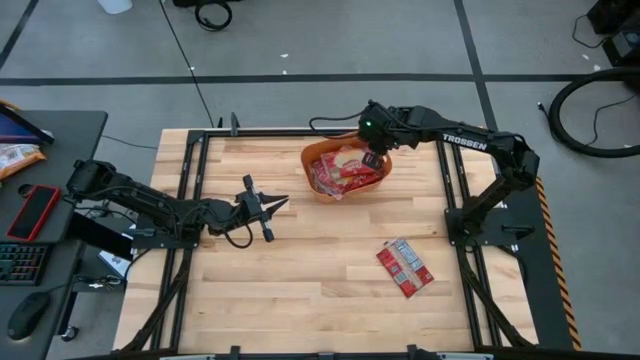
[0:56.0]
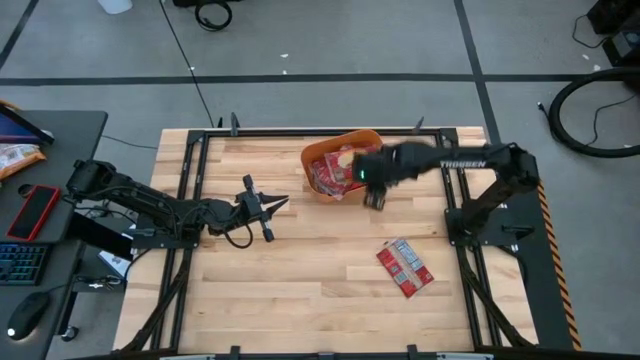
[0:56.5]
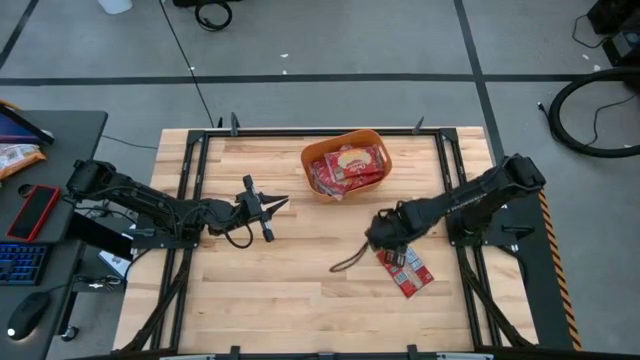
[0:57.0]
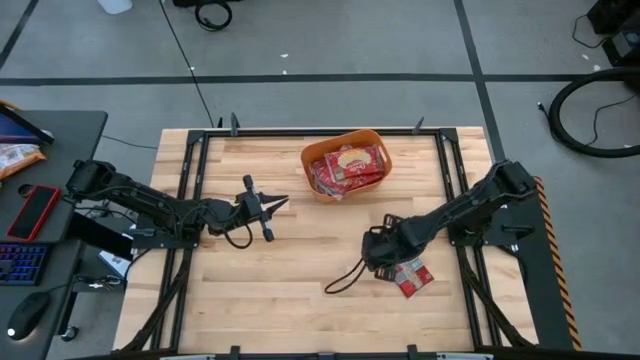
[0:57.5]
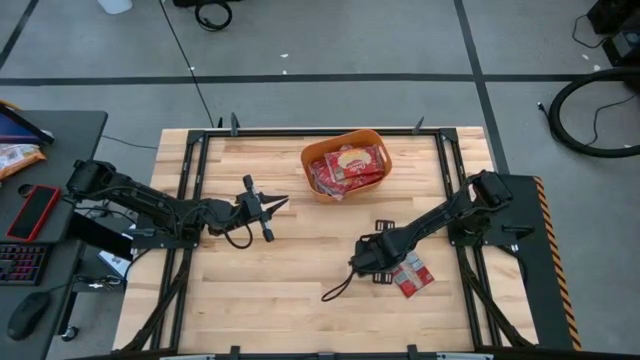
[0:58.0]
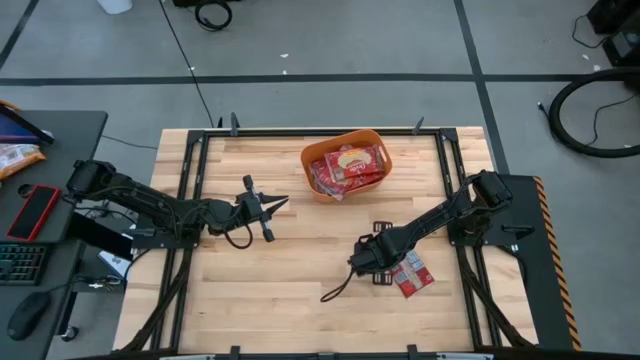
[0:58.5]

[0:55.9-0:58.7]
Task: Sort popcorn bags into baskets
Put the red popcorn bag into the orange bin

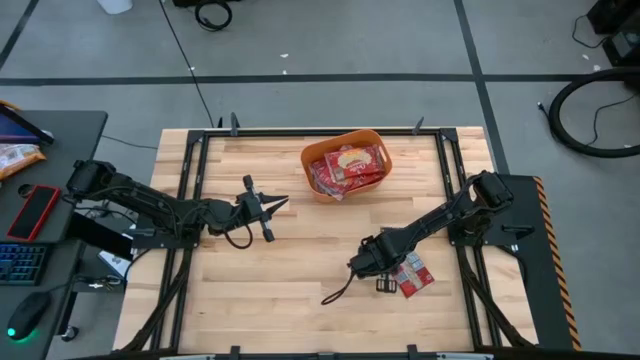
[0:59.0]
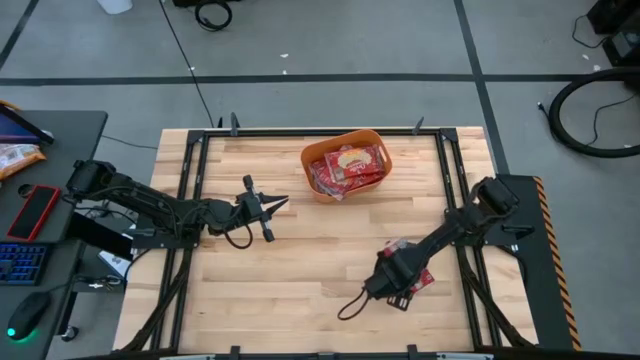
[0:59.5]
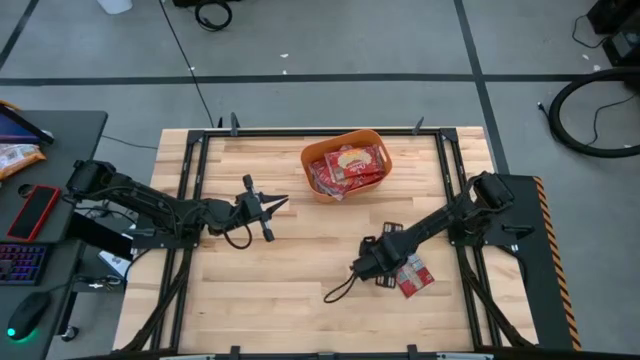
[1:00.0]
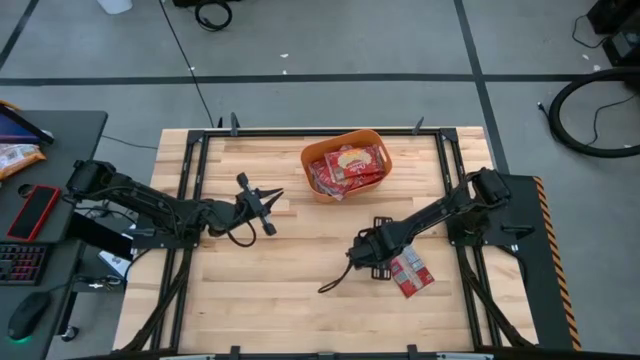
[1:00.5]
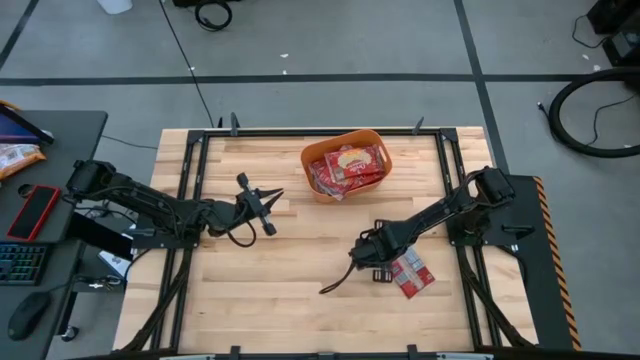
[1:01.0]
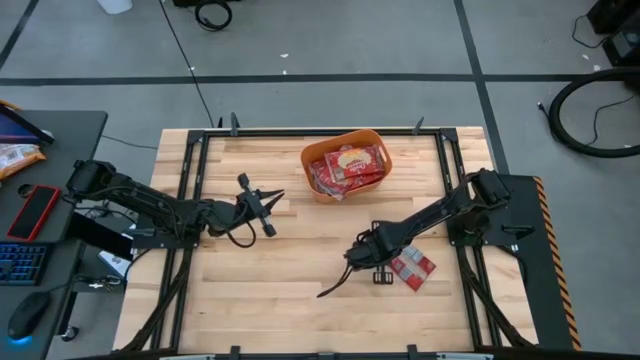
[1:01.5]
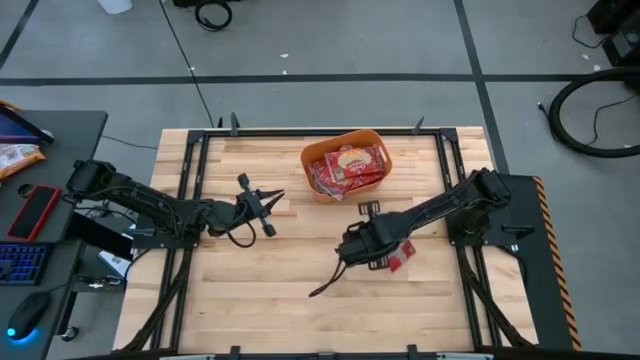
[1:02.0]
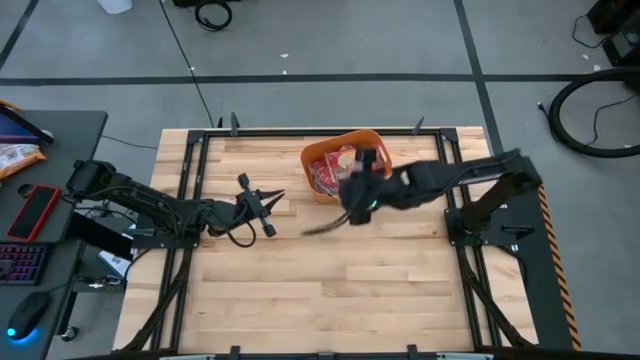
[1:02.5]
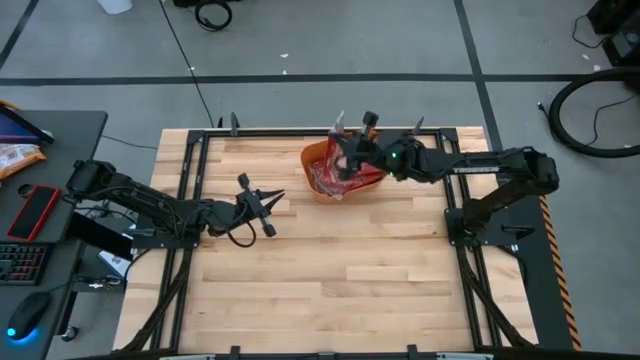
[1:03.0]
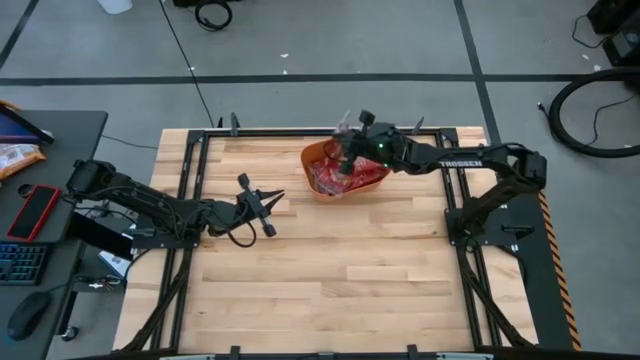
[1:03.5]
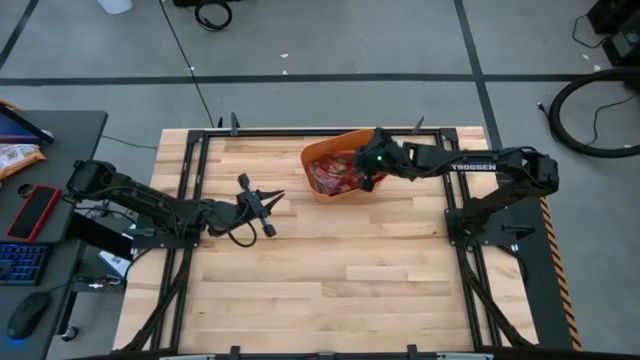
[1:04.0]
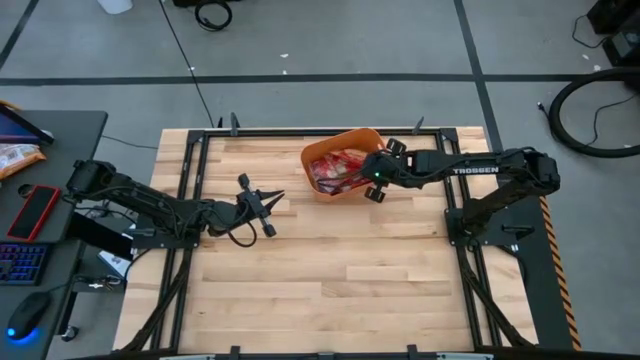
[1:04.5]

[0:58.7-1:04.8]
Put the red popcorn bag into the orange bin

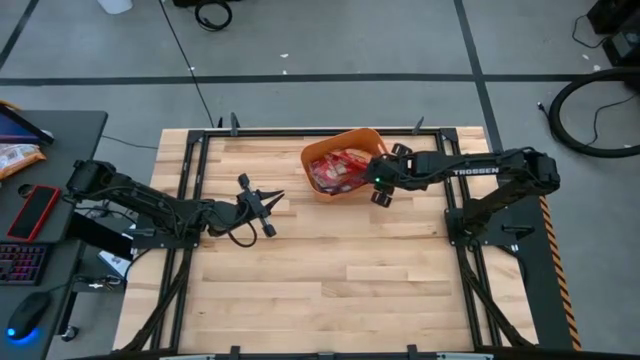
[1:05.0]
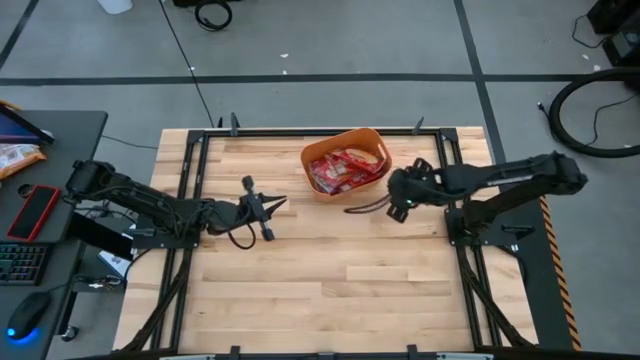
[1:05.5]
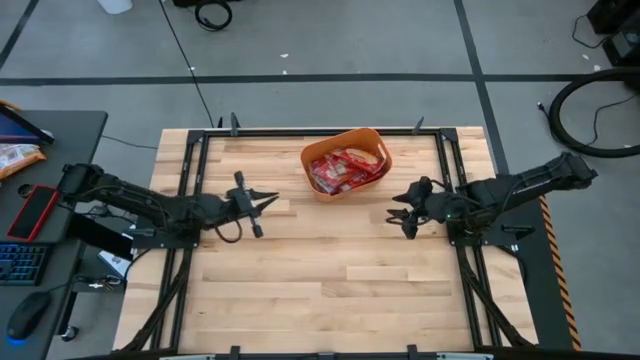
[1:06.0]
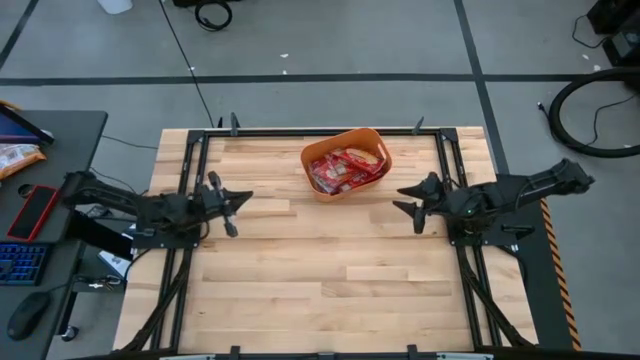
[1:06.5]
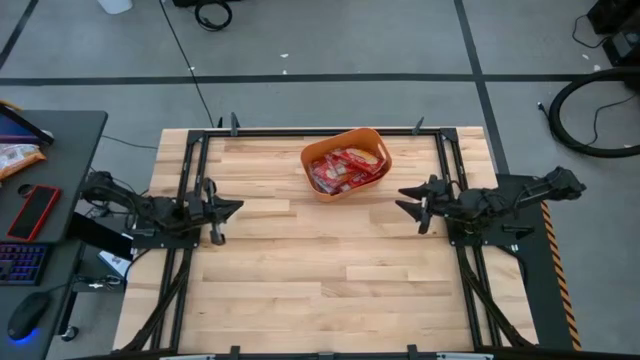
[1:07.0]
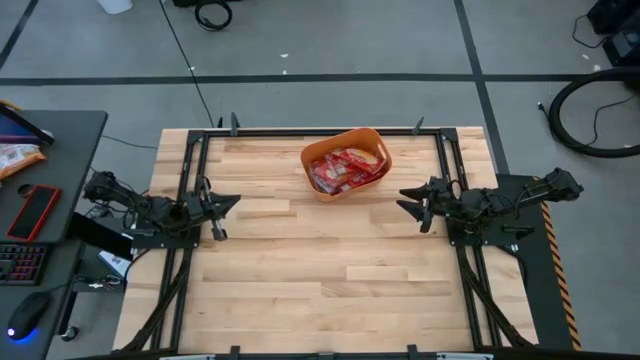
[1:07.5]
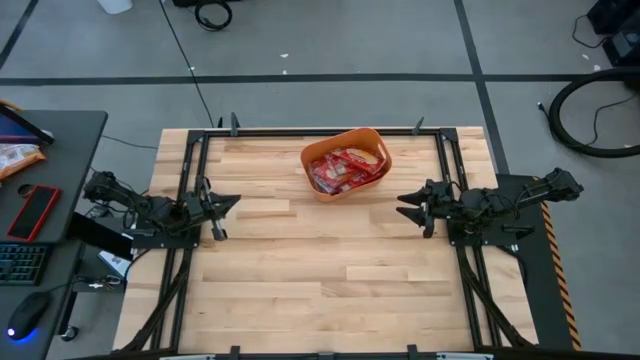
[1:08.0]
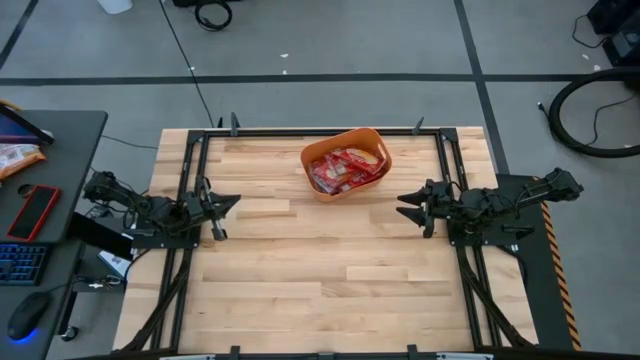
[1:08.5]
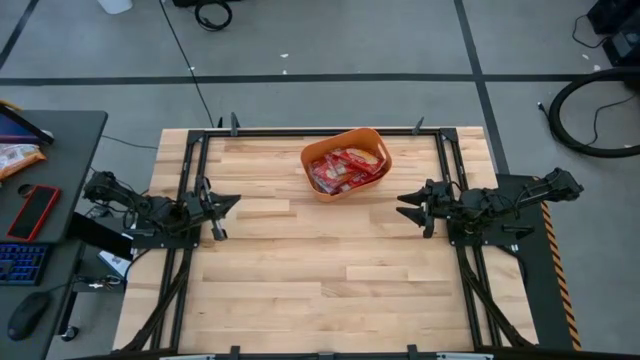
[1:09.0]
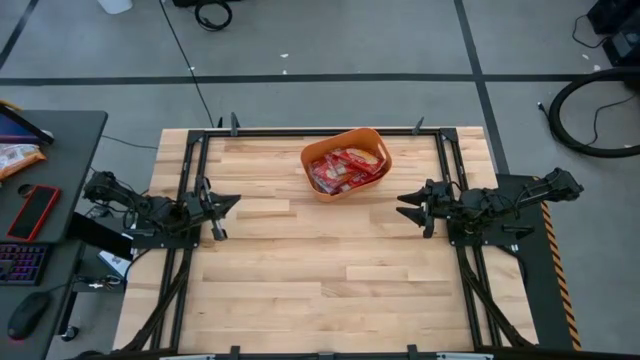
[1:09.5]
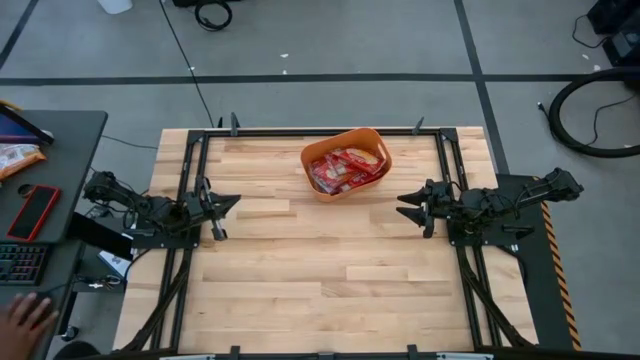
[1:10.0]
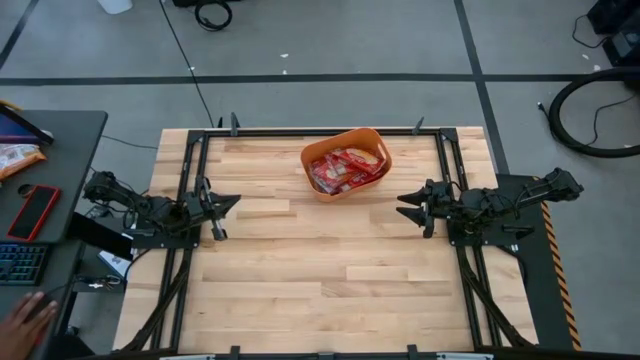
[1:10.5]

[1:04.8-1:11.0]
Return to Home Position

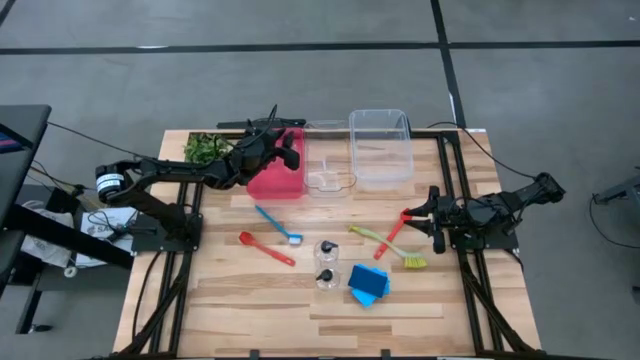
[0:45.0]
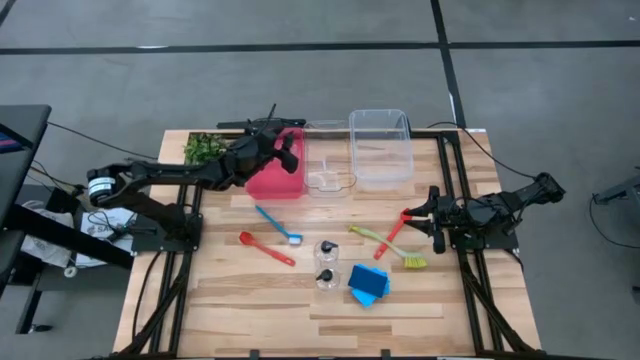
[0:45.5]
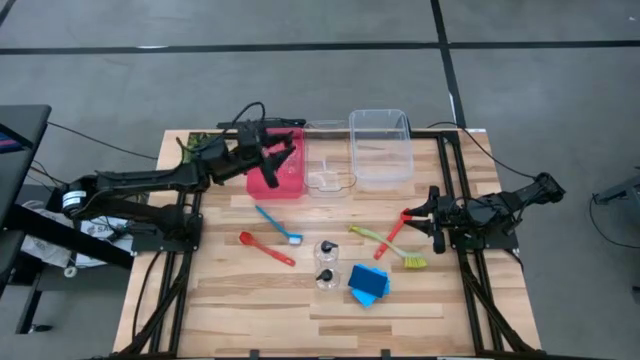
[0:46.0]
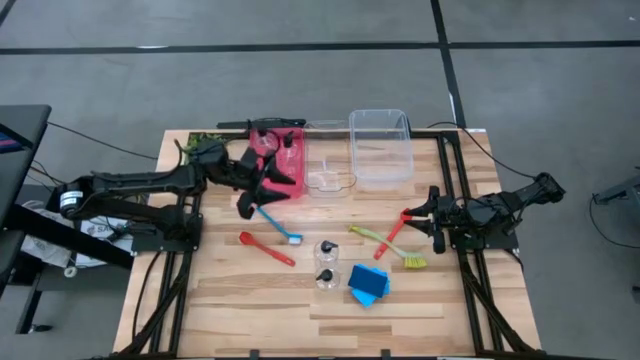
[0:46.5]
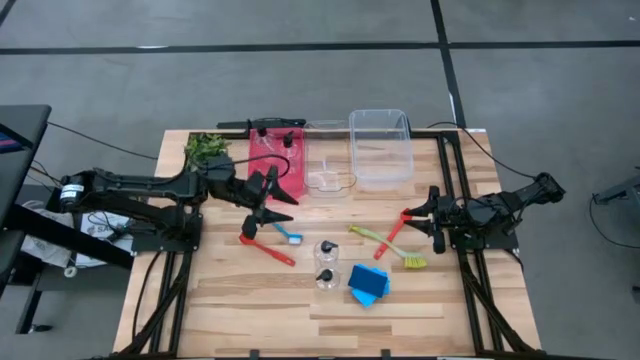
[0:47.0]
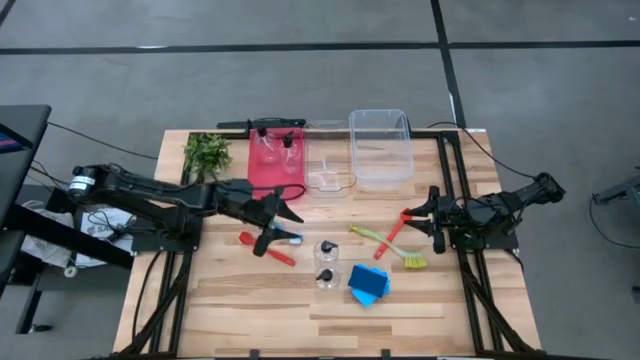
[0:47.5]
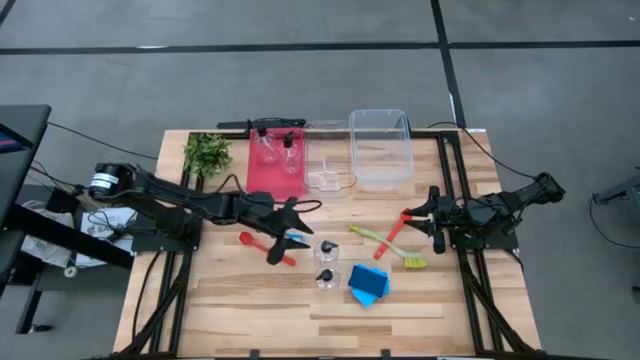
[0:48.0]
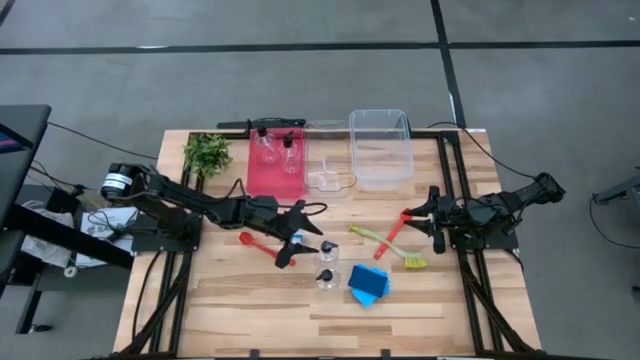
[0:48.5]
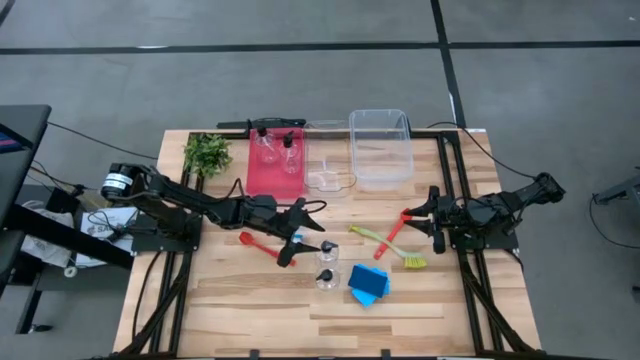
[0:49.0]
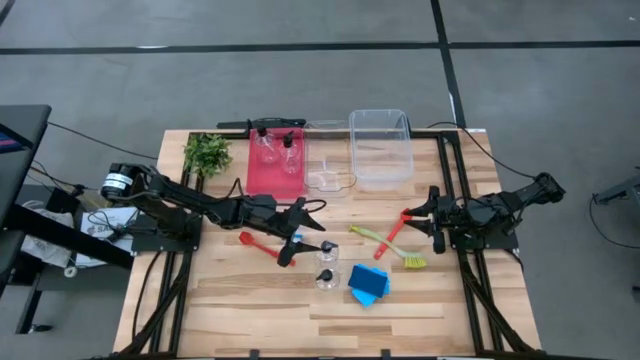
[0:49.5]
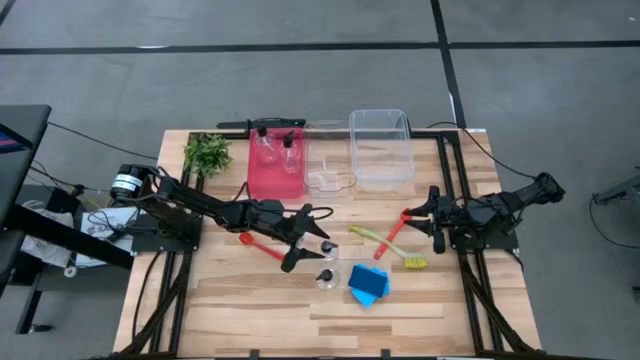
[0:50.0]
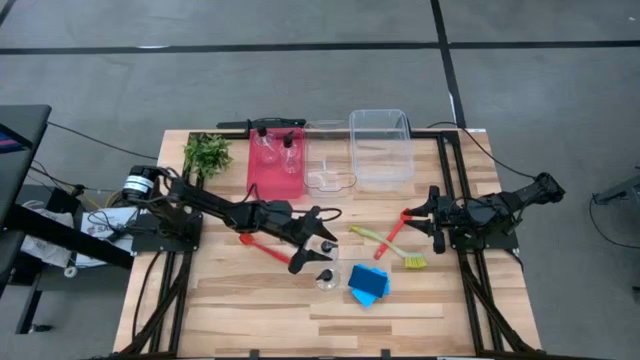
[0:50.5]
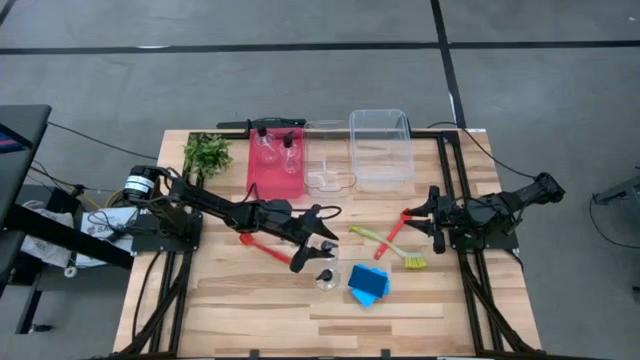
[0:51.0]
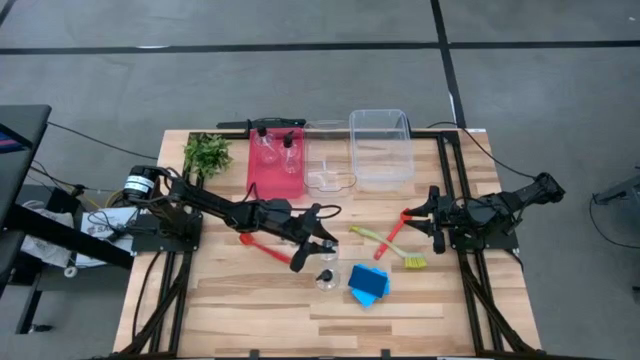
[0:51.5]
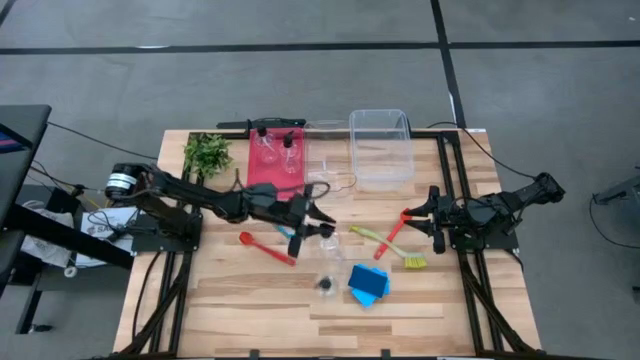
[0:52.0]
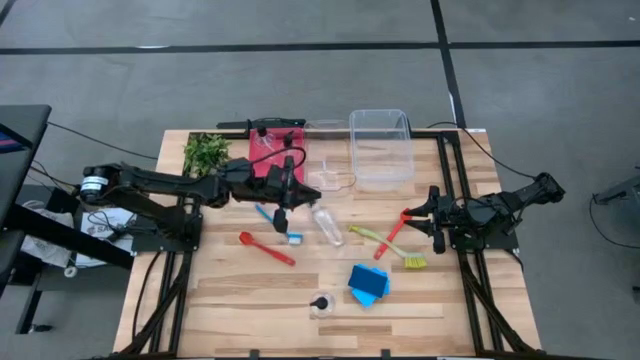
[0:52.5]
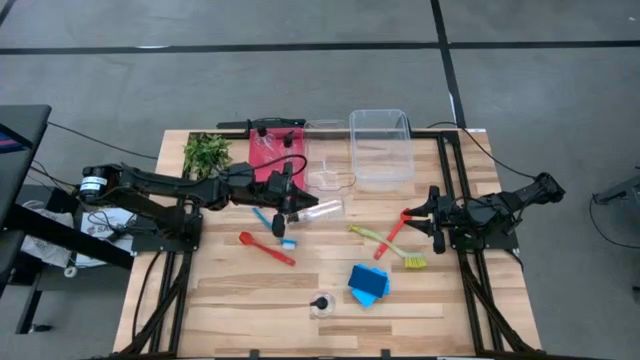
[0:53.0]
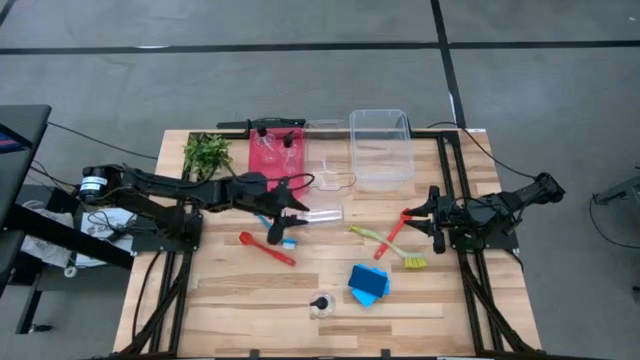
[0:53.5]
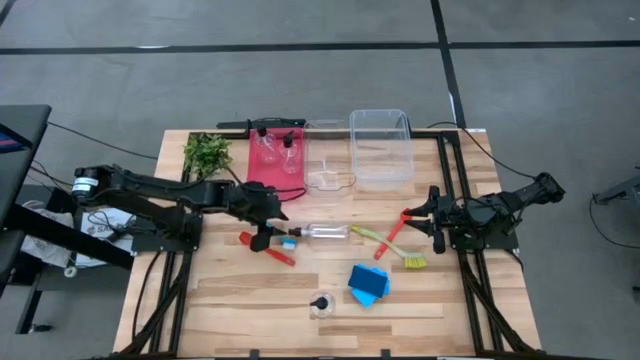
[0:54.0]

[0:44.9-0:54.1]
Task: Pick & Place Kitchen Sink Supplies
Put the spray bottle into the pink bin
